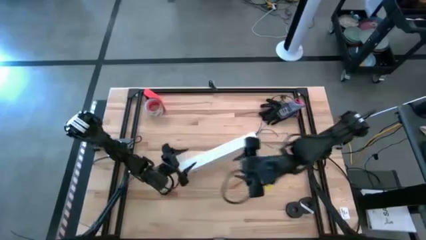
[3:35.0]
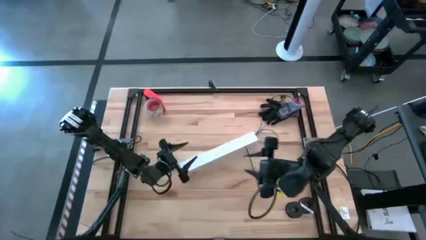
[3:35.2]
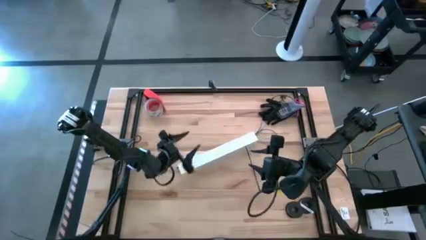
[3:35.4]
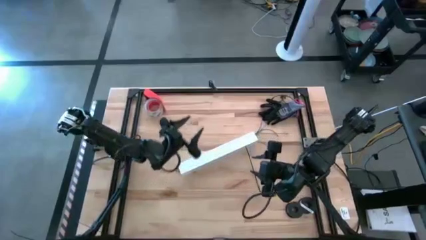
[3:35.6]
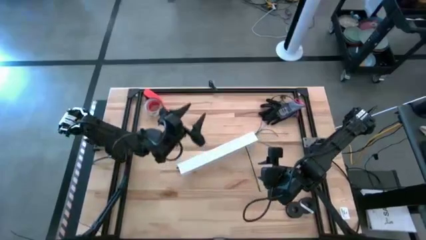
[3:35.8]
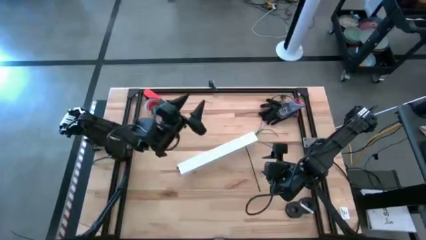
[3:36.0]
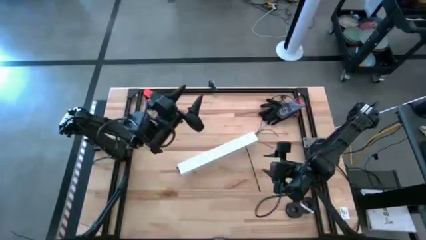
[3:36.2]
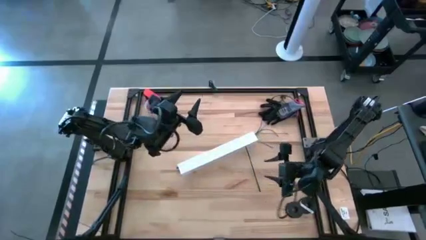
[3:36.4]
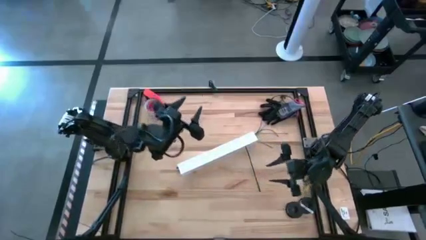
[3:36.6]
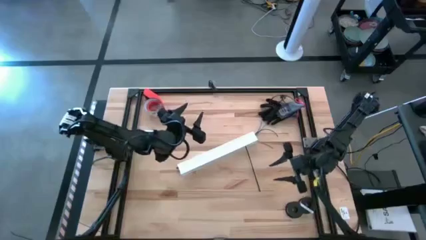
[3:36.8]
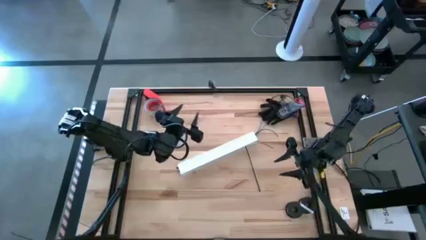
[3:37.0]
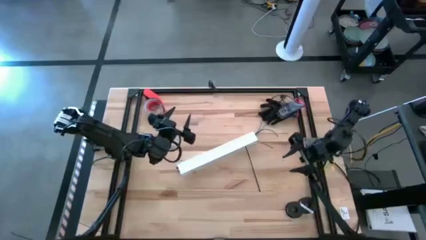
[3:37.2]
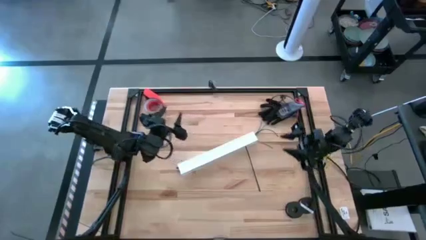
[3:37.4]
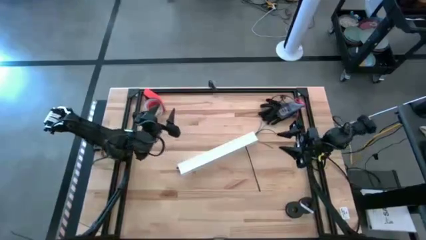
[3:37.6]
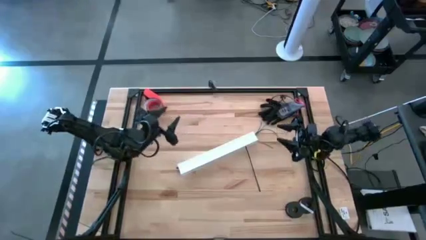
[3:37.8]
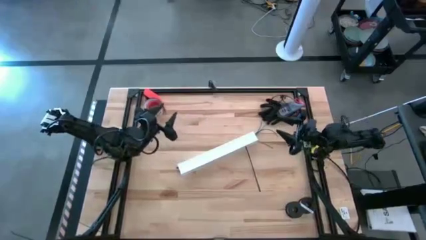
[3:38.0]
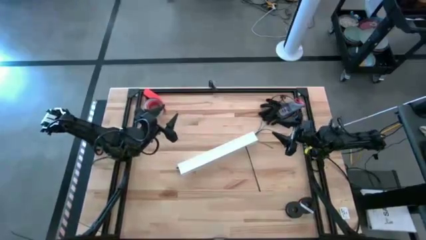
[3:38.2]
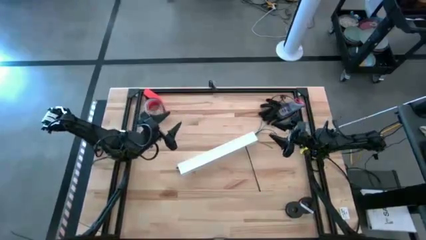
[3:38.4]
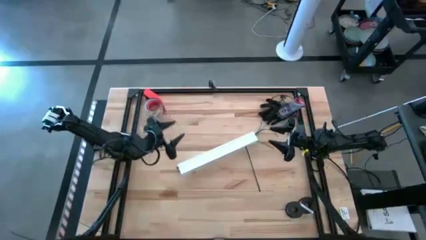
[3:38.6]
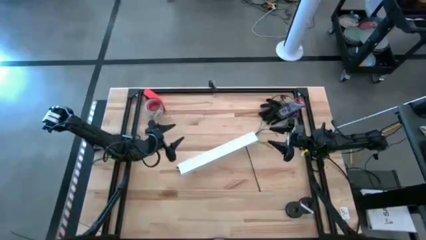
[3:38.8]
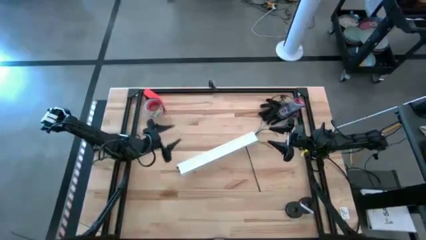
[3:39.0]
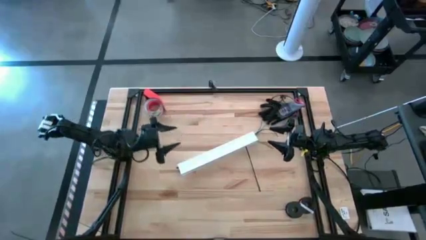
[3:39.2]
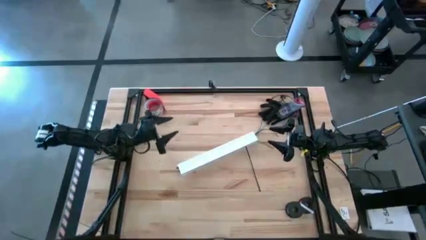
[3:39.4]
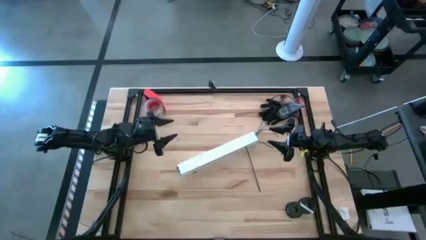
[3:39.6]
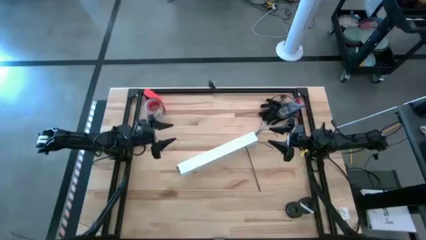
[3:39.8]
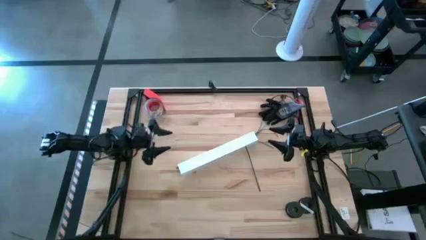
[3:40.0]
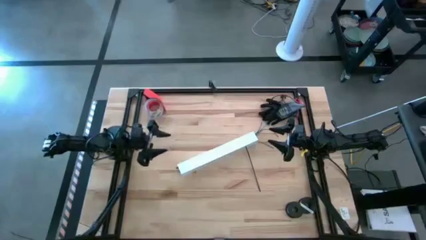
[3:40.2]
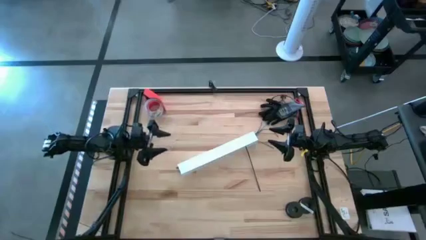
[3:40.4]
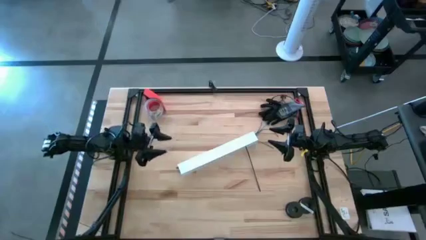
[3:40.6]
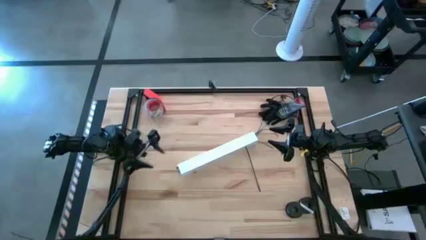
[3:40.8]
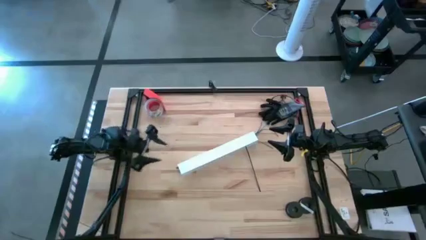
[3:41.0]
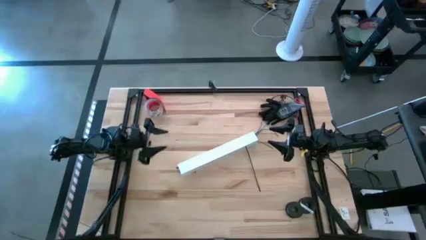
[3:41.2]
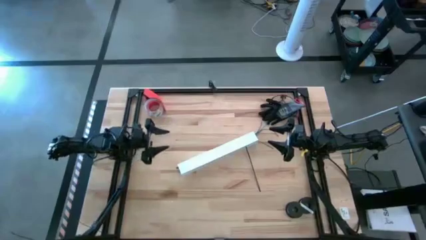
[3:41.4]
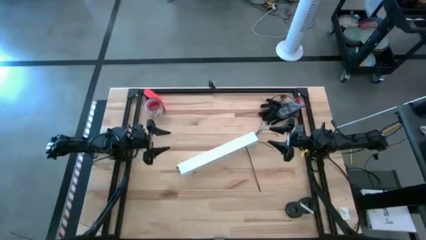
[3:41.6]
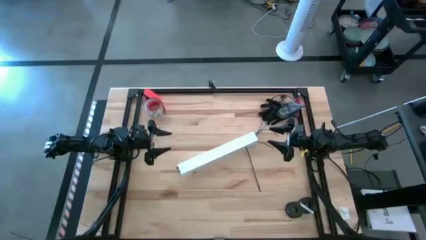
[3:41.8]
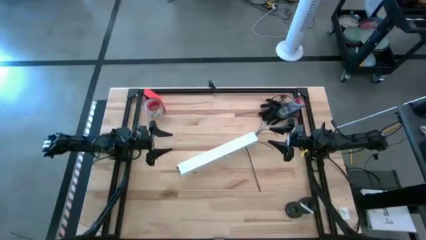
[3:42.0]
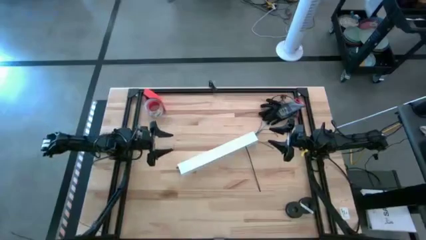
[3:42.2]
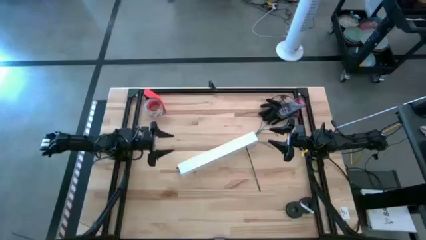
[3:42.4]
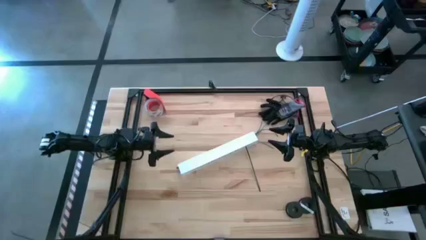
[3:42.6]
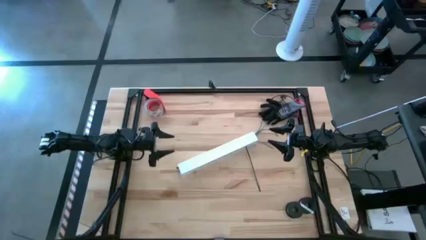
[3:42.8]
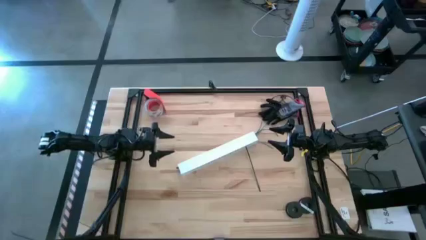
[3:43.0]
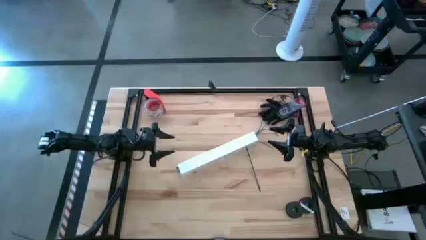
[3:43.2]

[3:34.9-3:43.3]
Task: Ziptie cables
Return to Home position

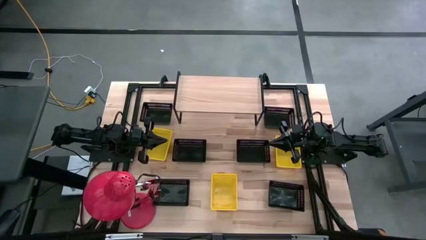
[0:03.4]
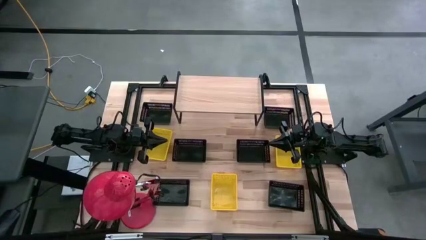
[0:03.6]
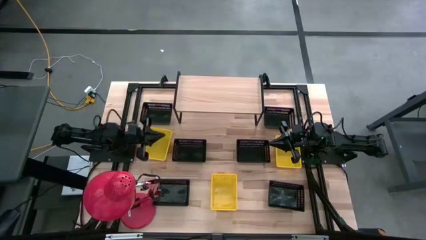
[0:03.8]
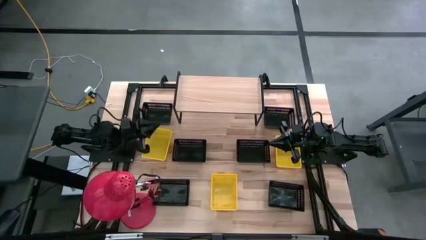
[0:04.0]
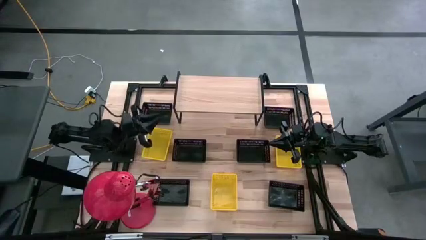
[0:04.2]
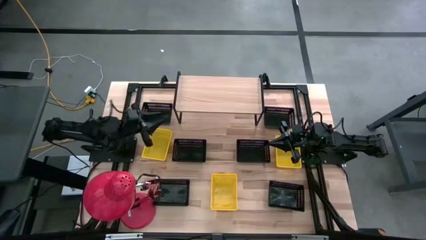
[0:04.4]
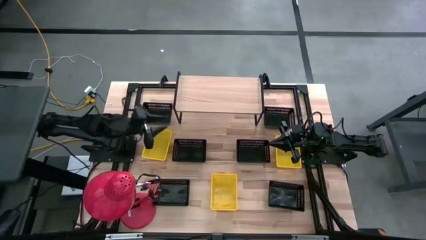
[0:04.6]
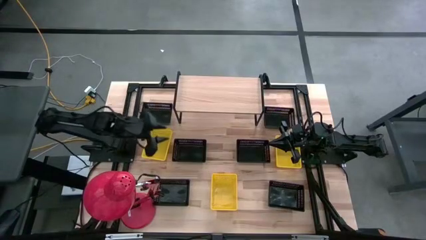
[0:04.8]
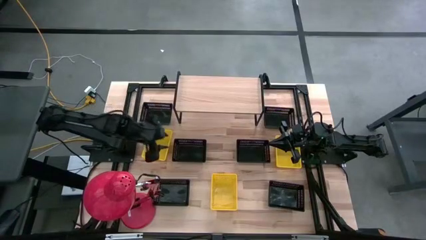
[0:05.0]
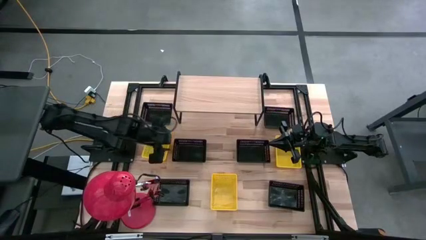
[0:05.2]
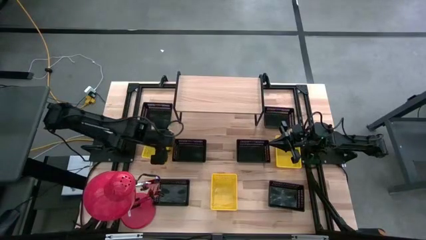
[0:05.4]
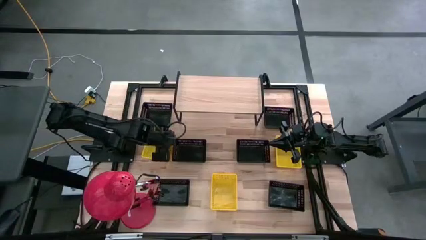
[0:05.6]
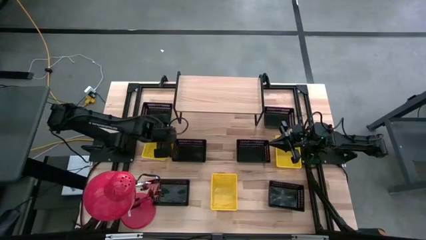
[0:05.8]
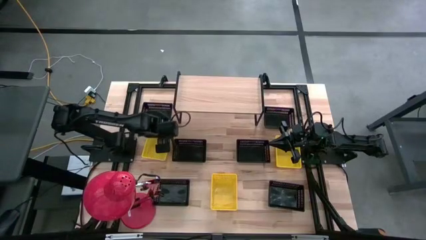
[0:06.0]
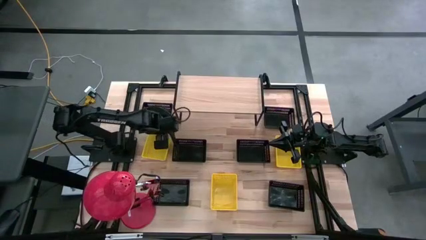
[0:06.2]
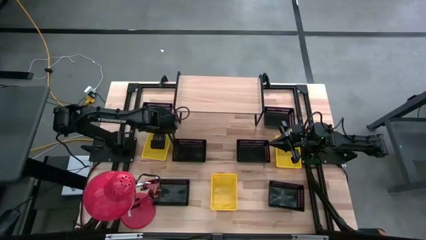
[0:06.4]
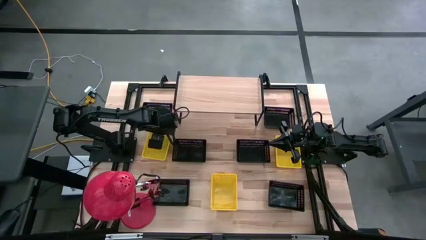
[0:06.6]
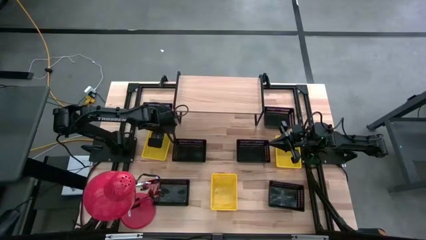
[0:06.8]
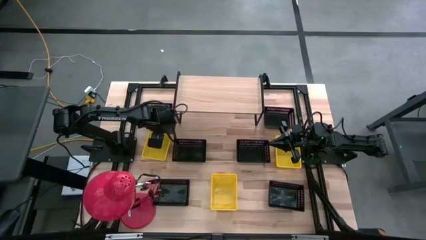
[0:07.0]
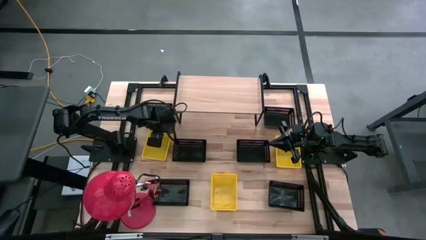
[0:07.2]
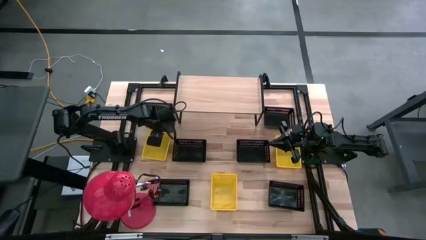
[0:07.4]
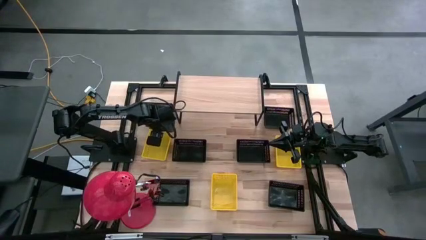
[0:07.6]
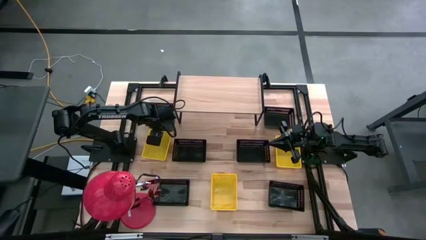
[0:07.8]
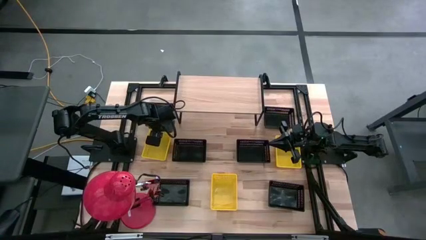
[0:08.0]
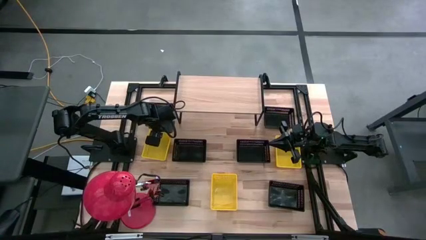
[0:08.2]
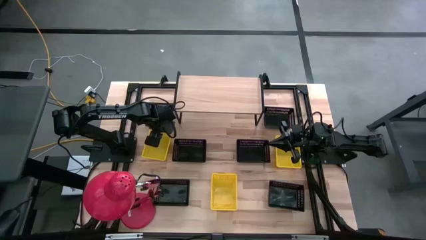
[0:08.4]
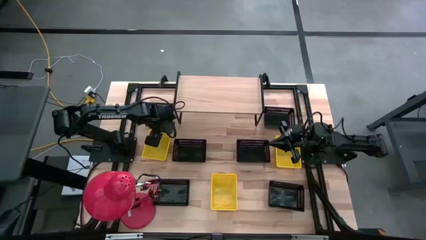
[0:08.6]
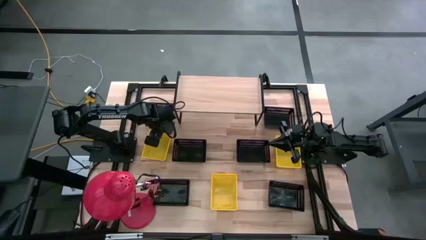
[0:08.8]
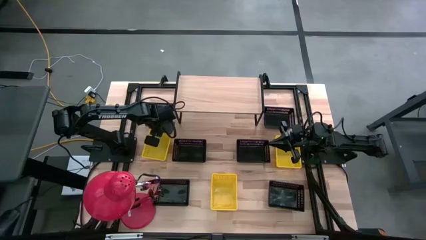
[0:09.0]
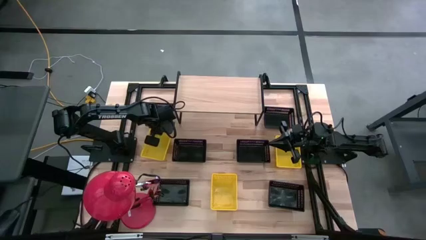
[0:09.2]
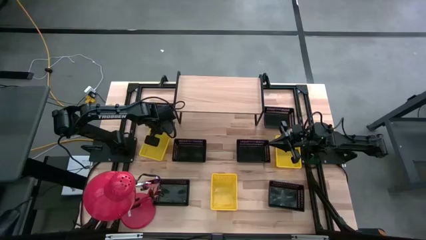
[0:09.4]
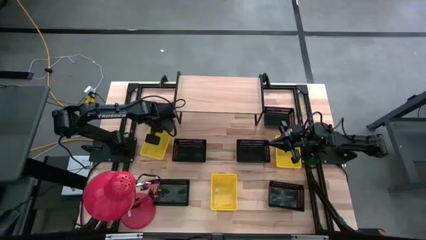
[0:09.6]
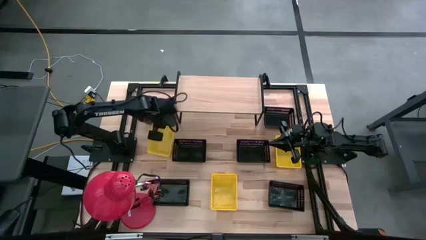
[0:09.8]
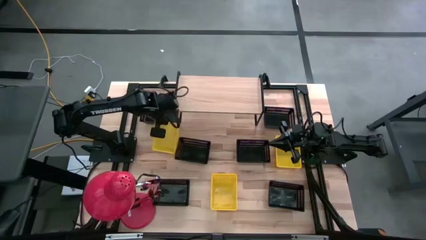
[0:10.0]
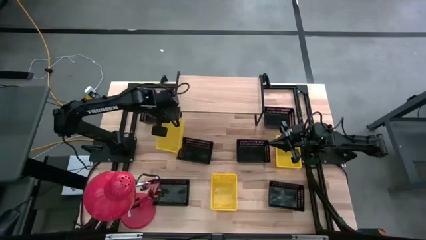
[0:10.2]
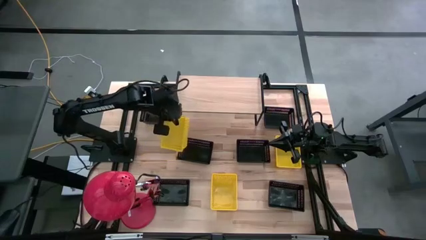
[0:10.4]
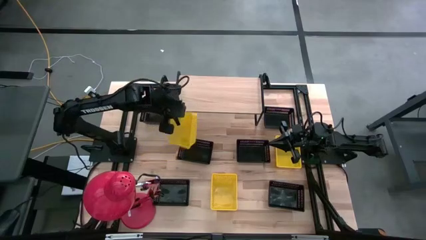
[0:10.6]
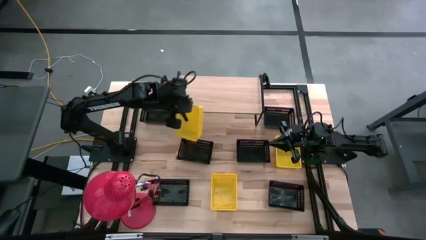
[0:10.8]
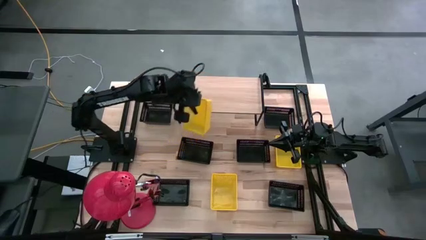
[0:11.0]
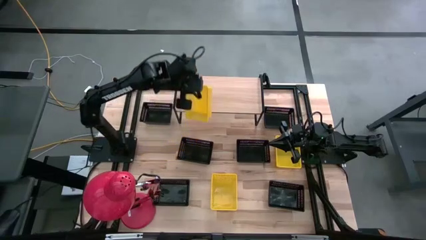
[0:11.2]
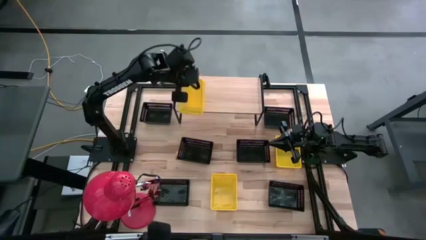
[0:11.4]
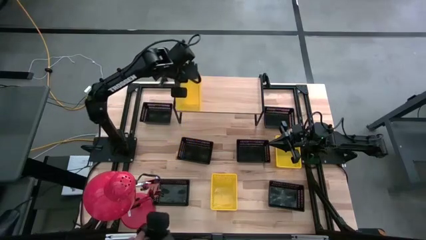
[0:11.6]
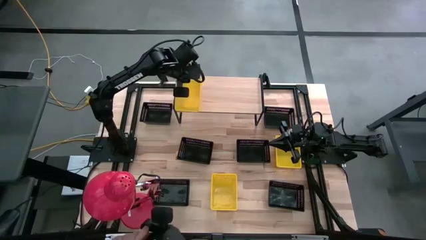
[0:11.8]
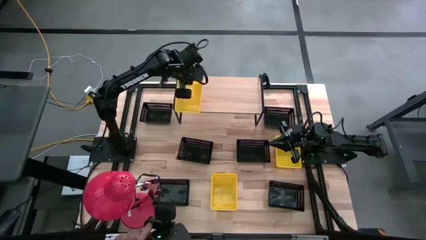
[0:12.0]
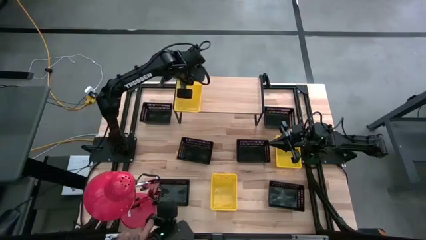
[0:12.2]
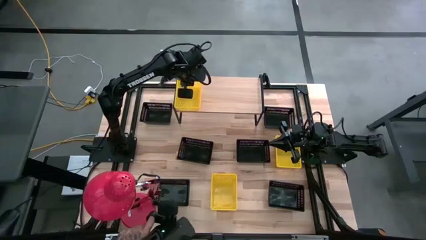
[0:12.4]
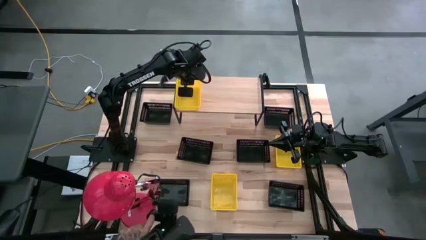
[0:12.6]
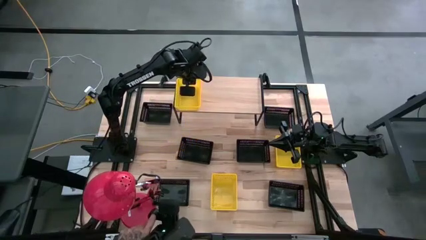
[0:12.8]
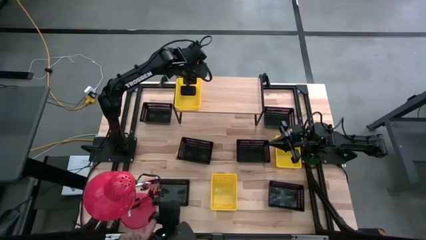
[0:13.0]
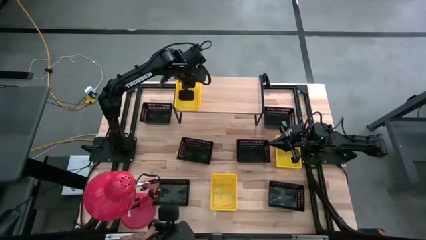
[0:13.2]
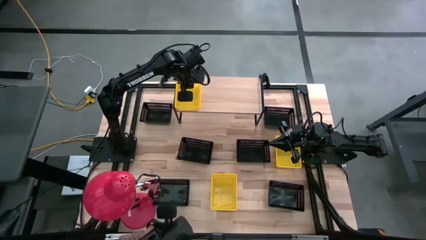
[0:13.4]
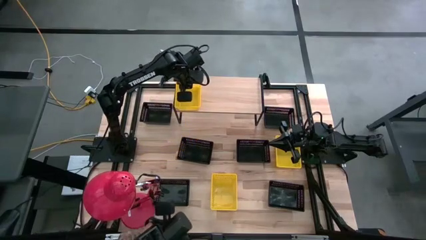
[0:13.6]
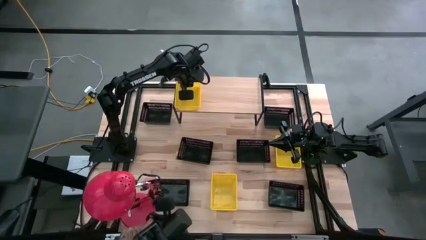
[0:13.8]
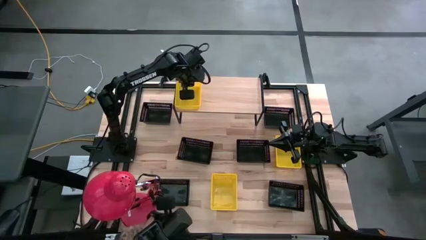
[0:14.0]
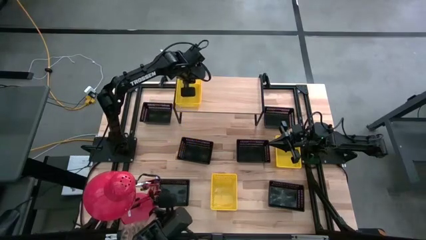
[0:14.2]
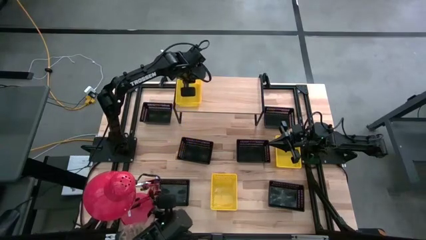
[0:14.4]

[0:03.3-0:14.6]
Task: Stack baskets on shelf by color
Put the left yellow bin on the shelf
